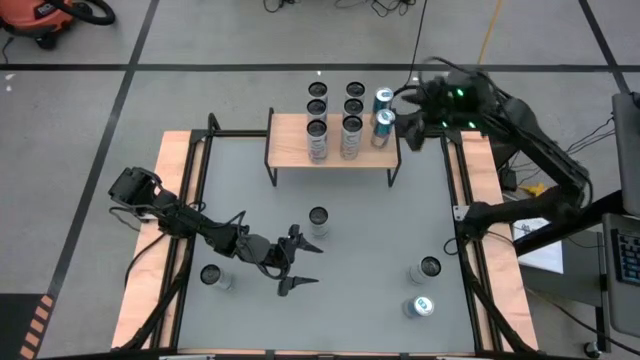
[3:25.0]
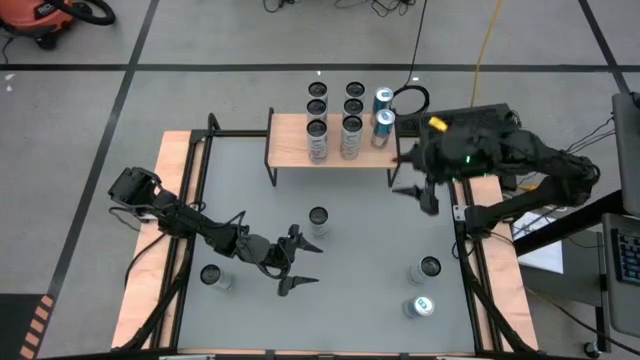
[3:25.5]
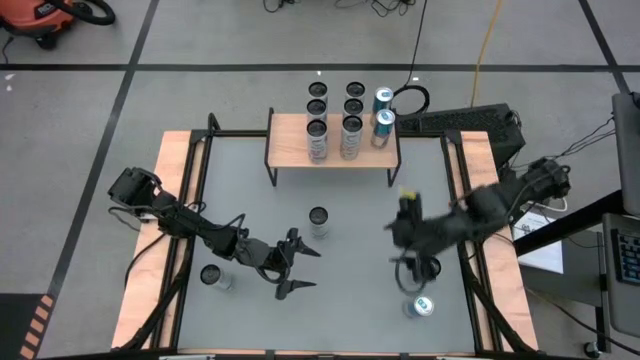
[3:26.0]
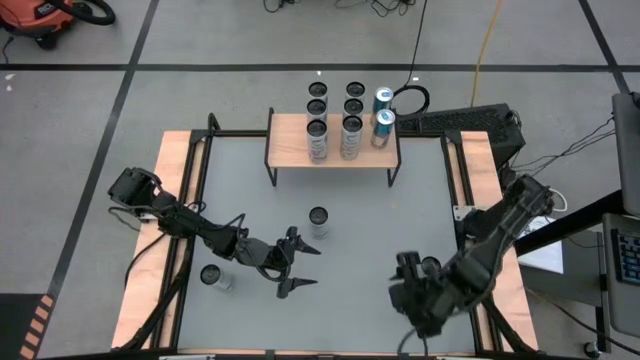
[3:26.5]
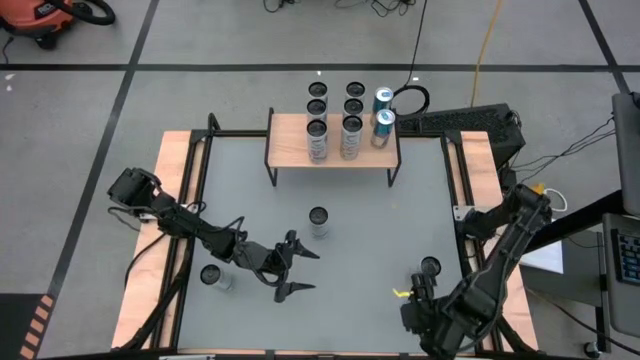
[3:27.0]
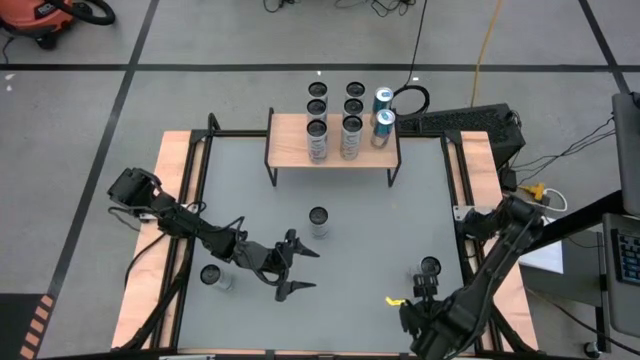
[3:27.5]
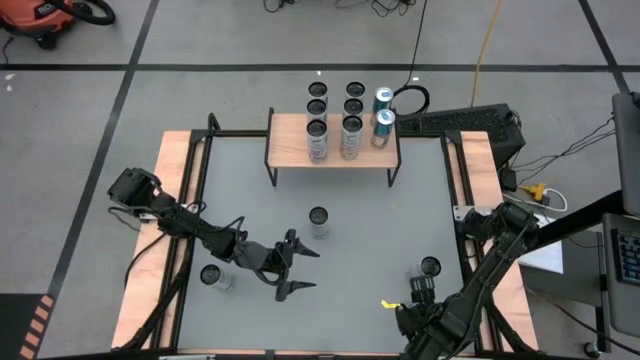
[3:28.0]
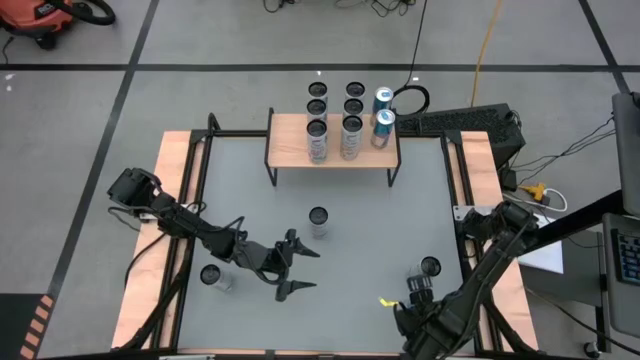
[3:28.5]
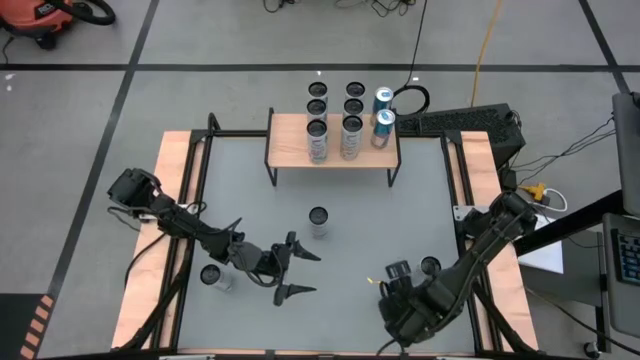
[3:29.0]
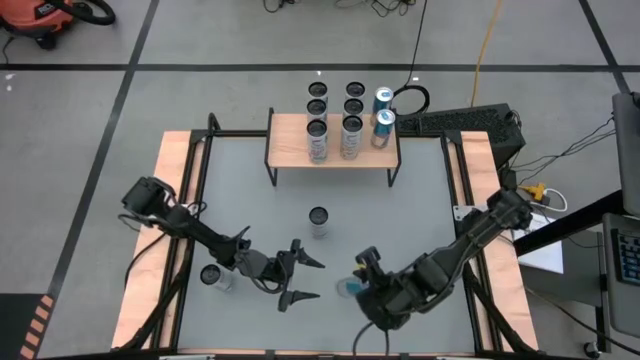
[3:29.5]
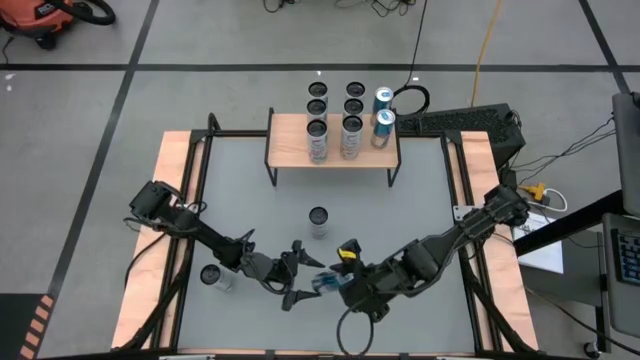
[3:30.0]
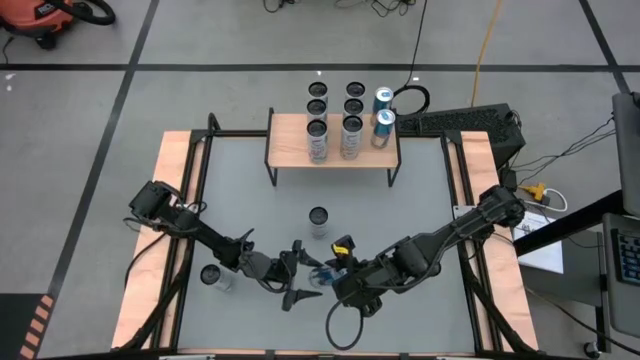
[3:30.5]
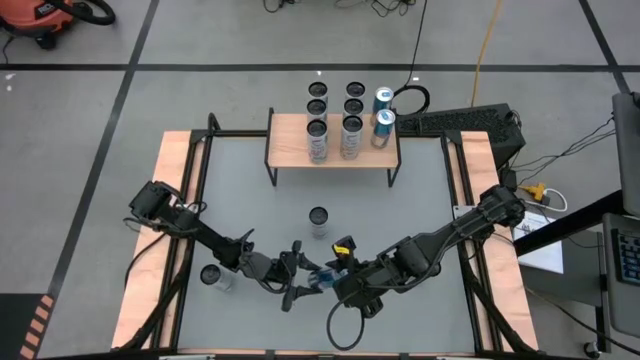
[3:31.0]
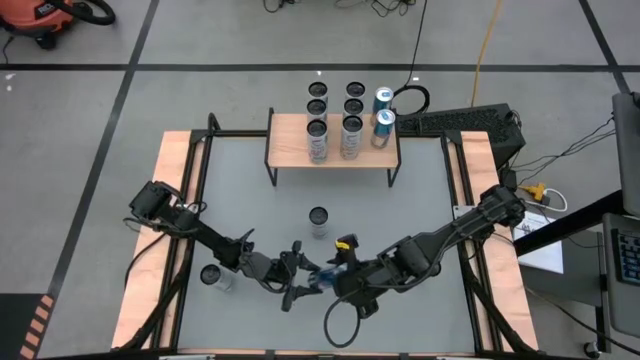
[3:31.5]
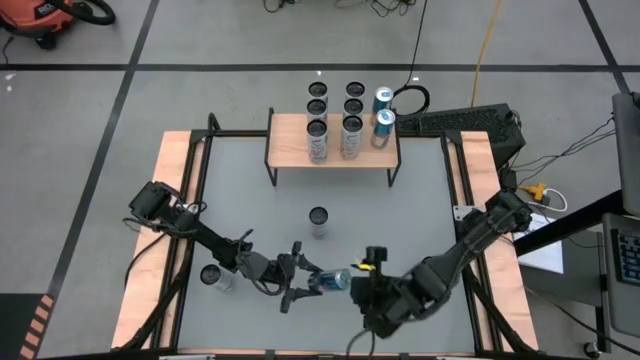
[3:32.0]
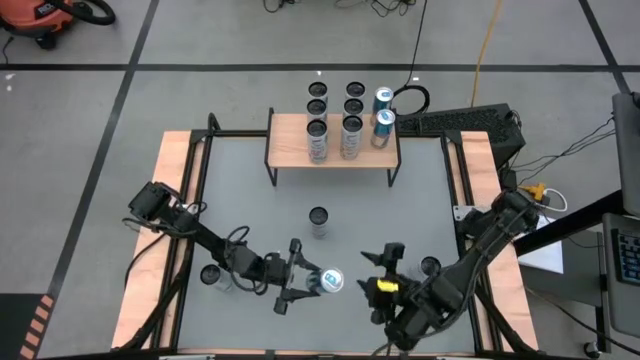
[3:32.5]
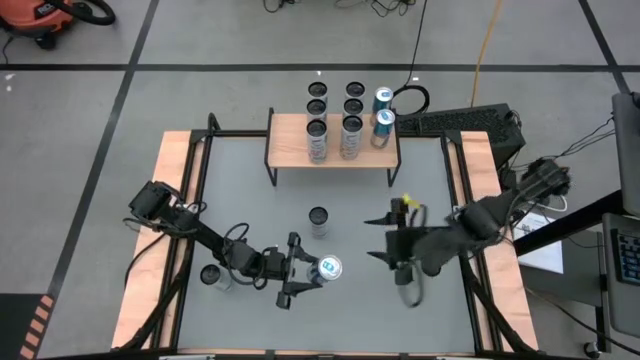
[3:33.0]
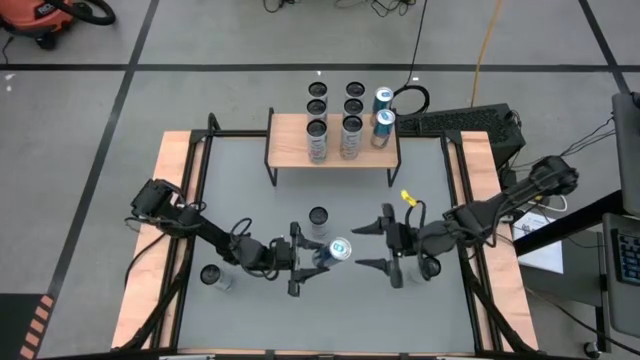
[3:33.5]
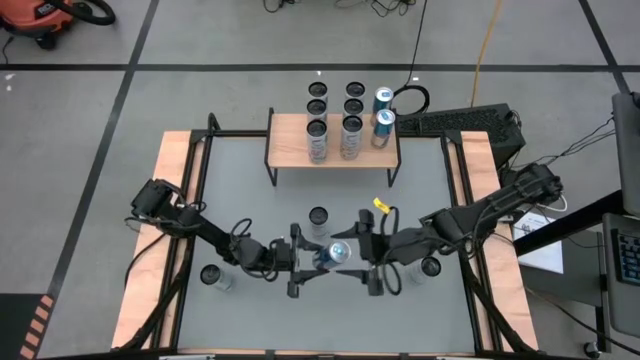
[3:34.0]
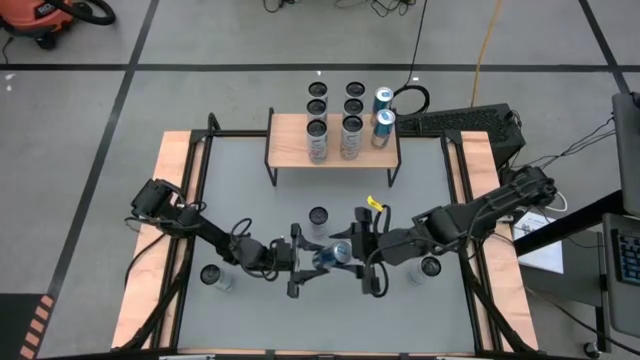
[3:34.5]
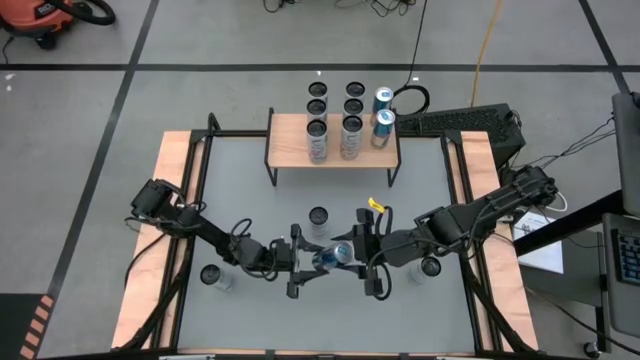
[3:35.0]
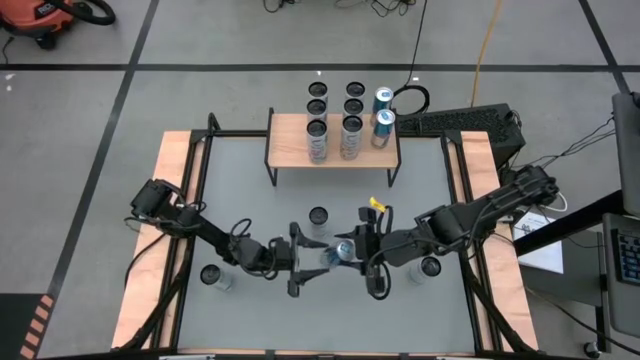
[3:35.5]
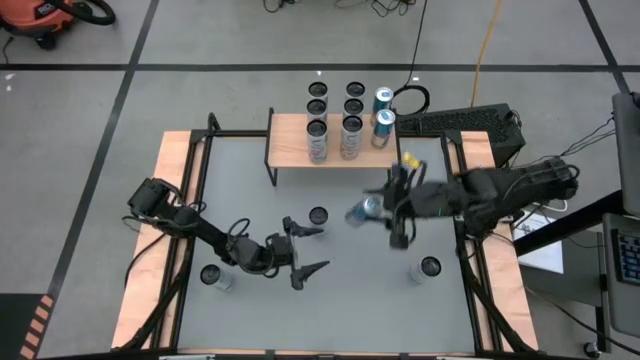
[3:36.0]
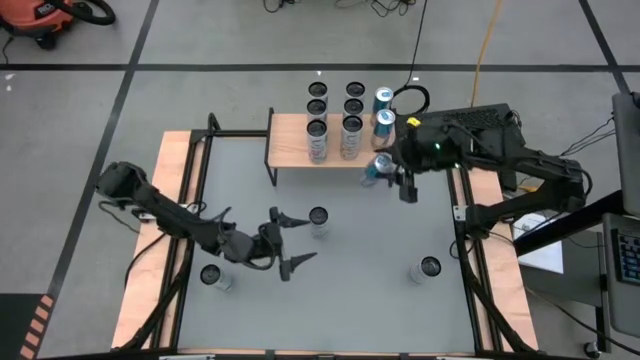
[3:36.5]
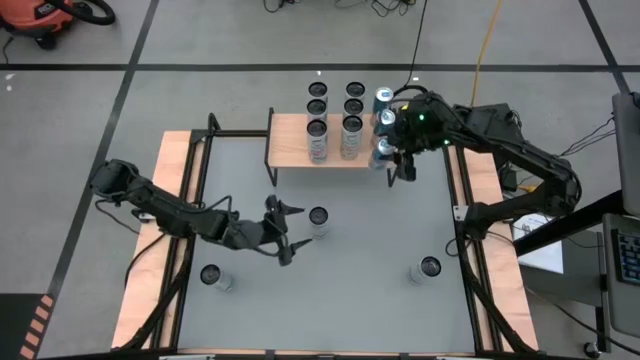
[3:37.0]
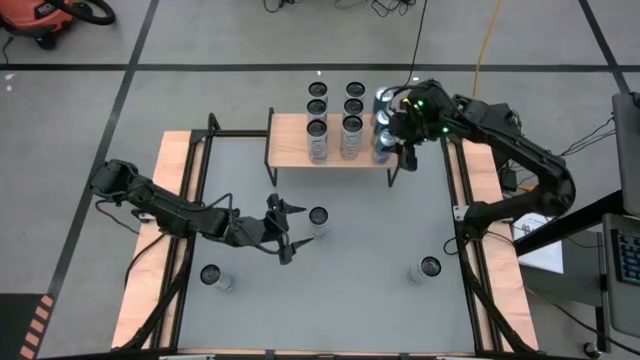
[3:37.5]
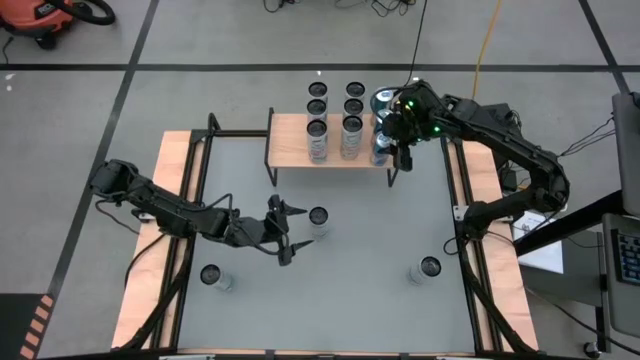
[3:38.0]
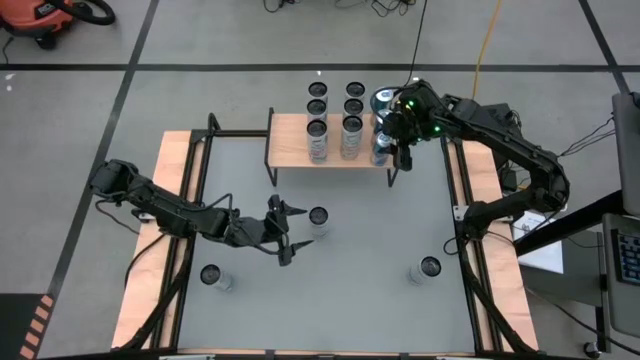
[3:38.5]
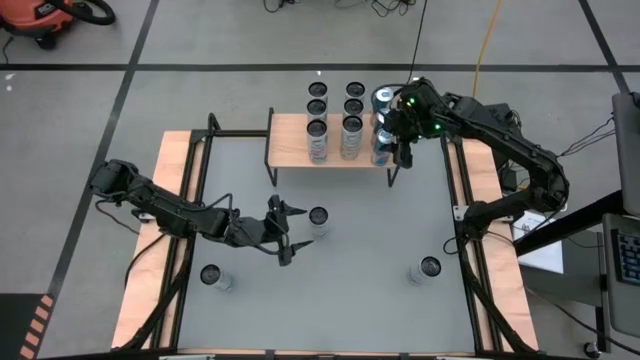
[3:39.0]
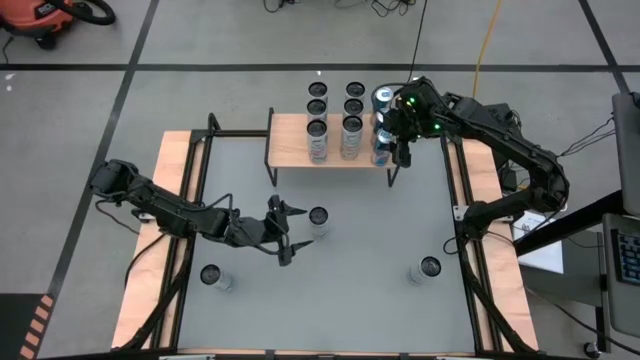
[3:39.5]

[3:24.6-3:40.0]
Task: Place canned beverage on shelf
Put the blue soda can on the shelf aligned with the other blue soda cans

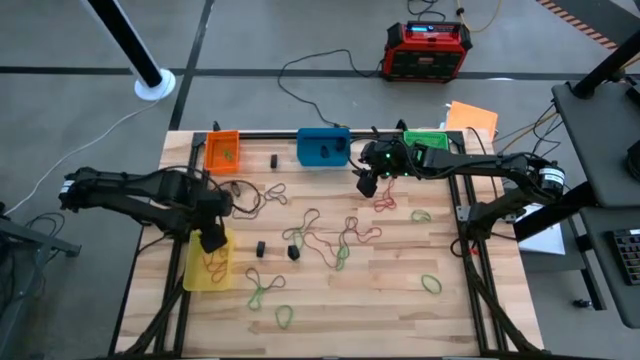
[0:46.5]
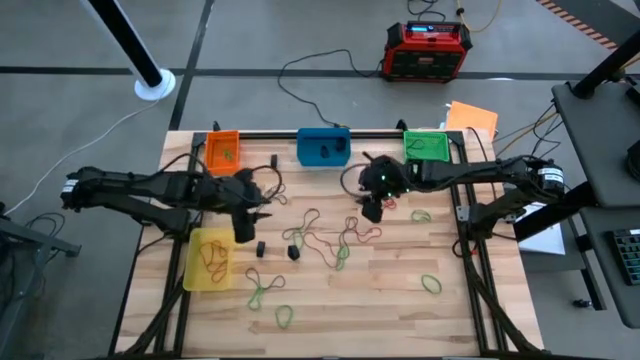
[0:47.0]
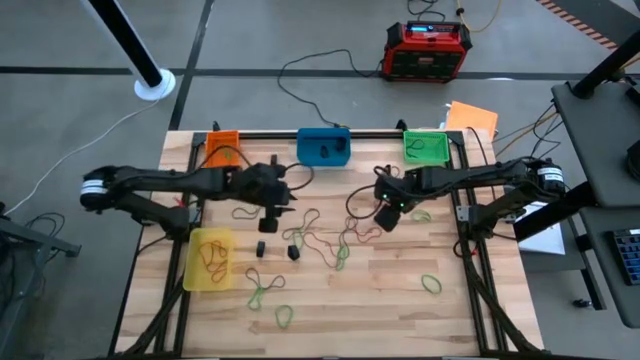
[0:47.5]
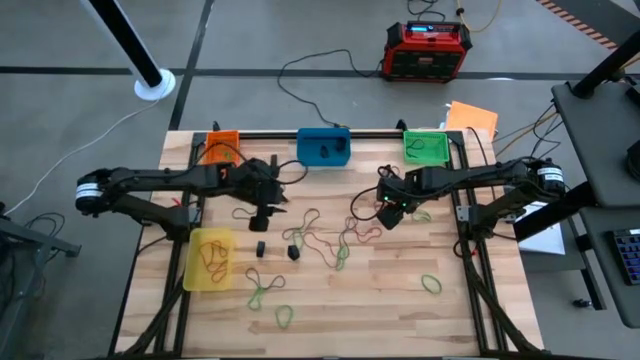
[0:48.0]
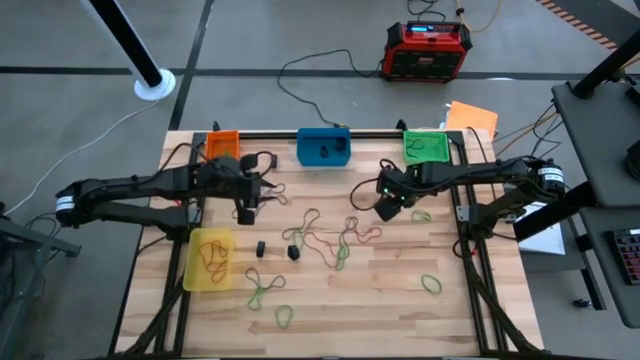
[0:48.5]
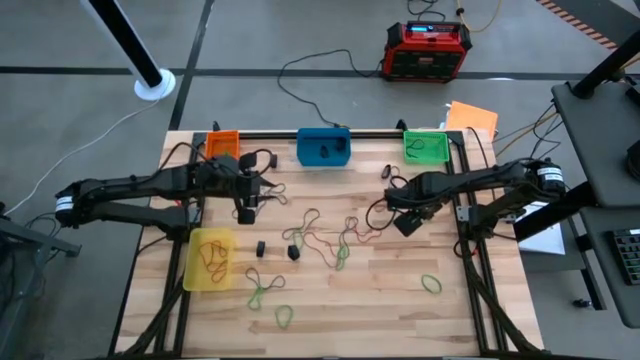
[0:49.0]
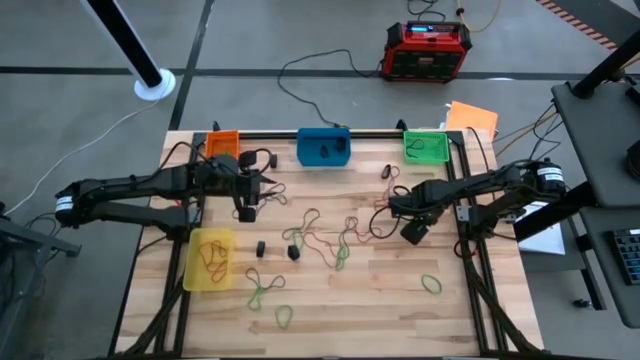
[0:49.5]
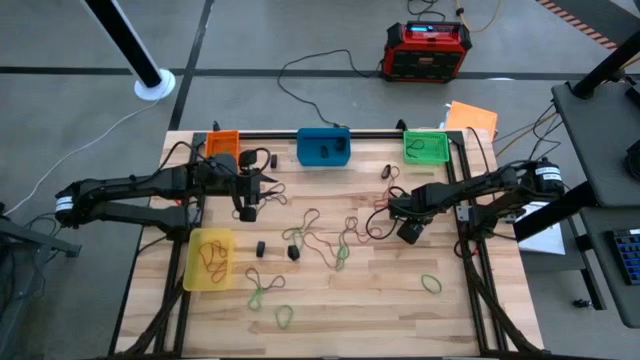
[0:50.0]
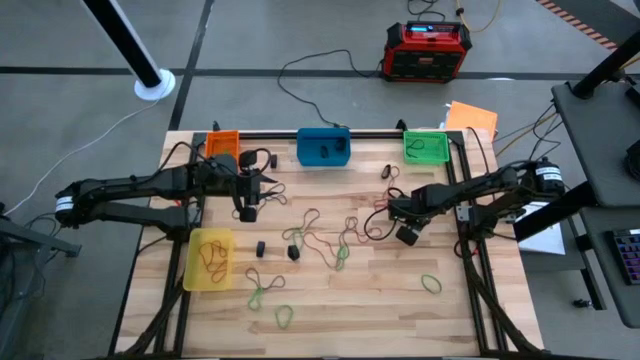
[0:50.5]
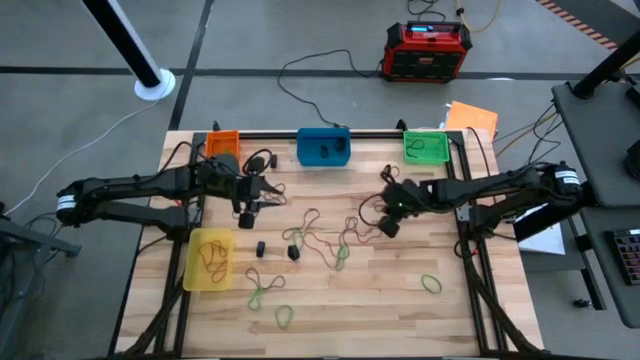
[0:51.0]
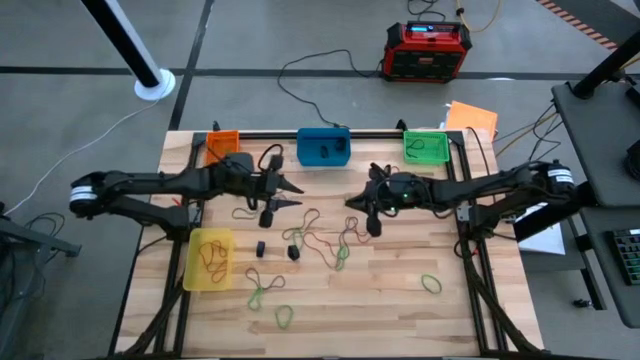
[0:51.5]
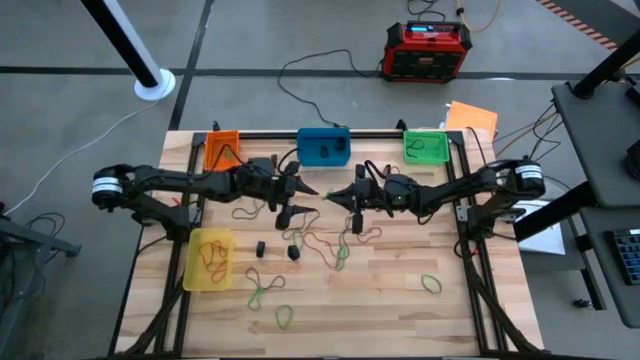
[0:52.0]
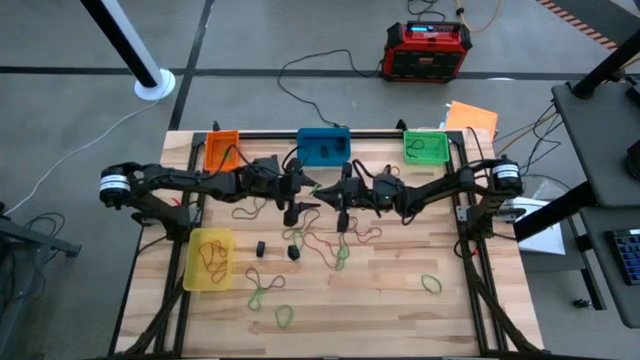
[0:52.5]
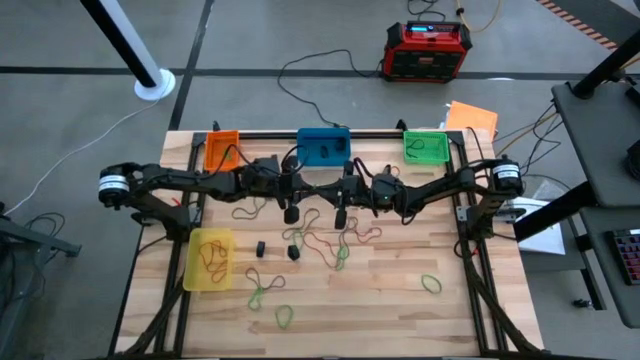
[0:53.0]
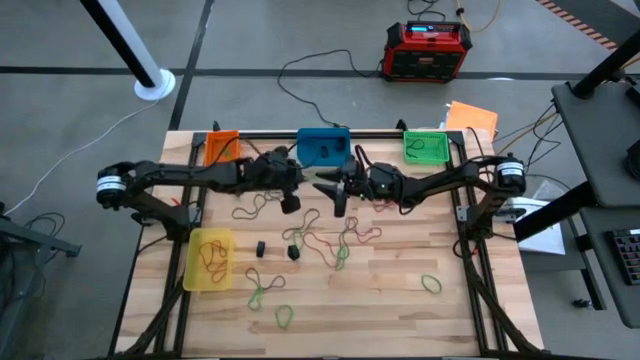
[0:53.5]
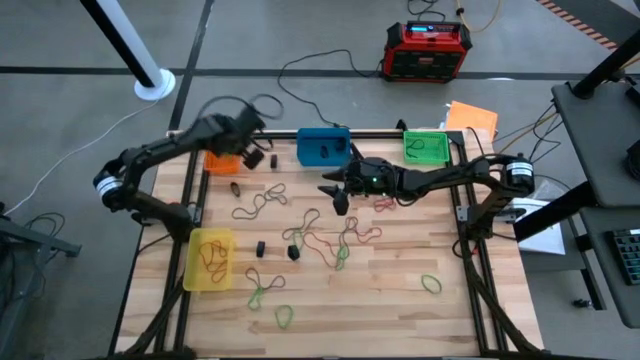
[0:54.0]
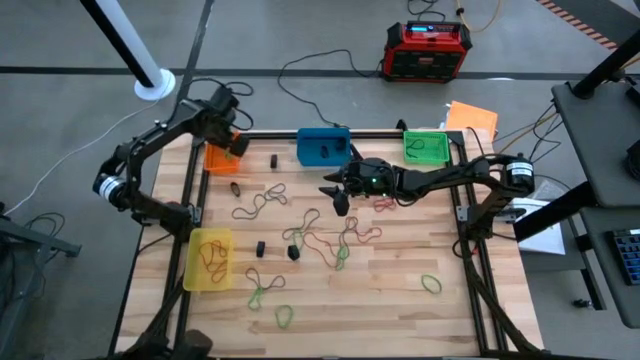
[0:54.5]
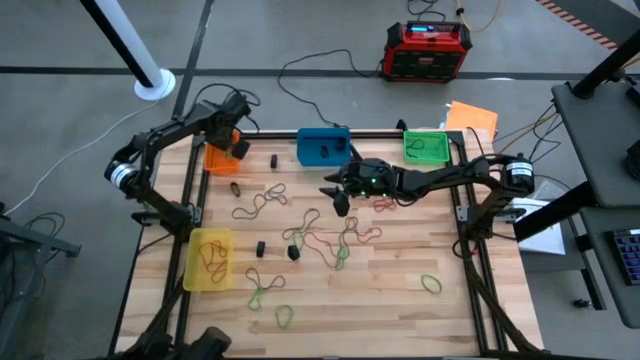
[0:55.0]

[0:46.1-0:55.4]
Task: Sort rubber bands into baskets
Put the green rubber band into the orange bin
